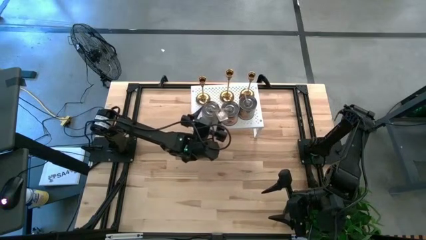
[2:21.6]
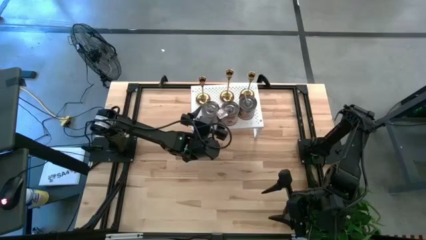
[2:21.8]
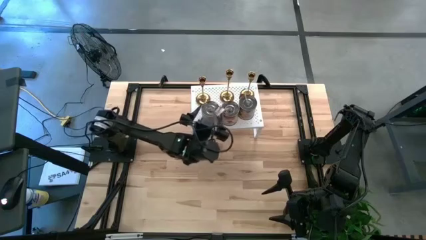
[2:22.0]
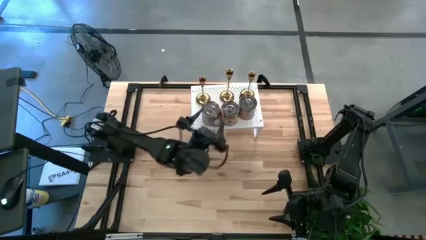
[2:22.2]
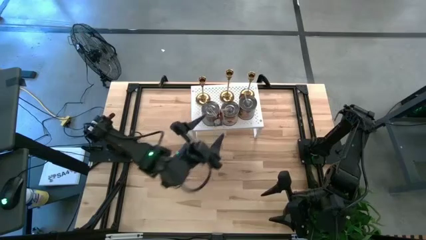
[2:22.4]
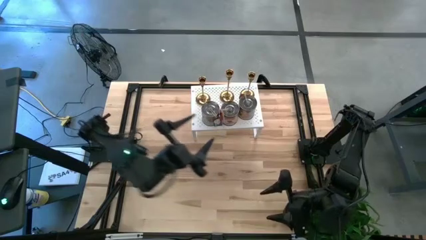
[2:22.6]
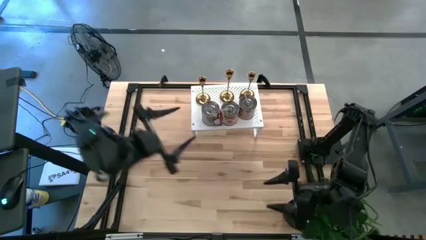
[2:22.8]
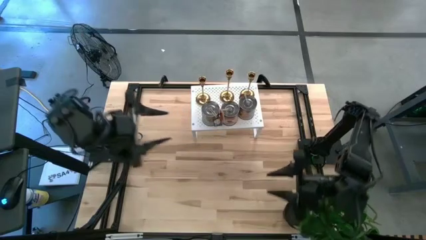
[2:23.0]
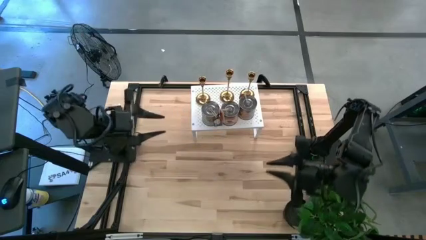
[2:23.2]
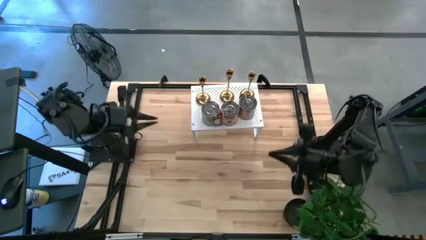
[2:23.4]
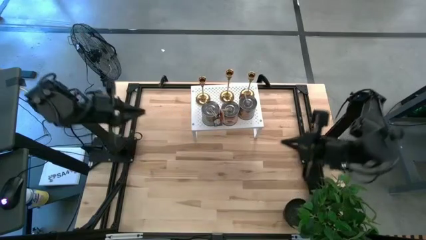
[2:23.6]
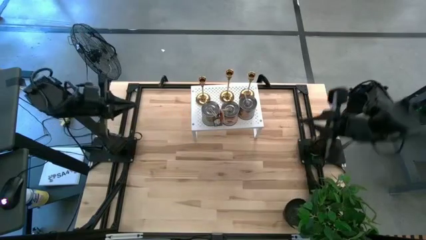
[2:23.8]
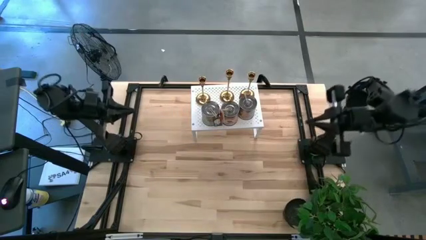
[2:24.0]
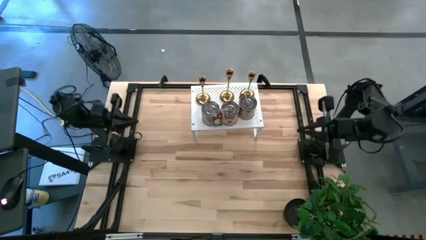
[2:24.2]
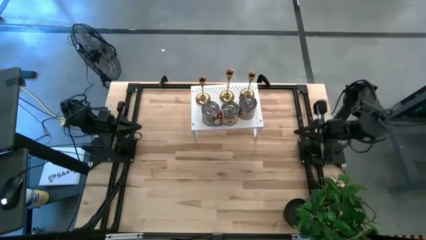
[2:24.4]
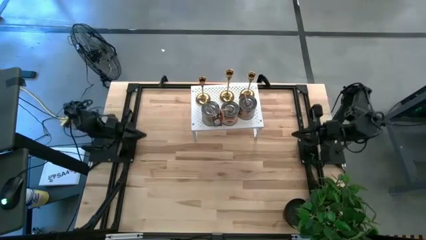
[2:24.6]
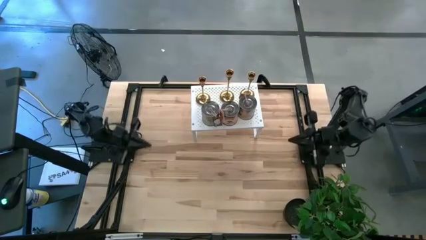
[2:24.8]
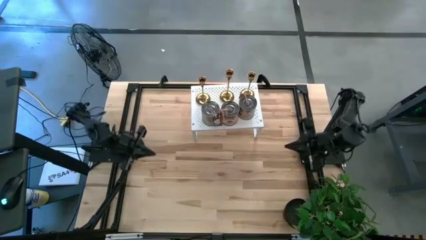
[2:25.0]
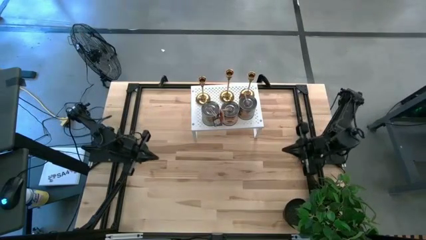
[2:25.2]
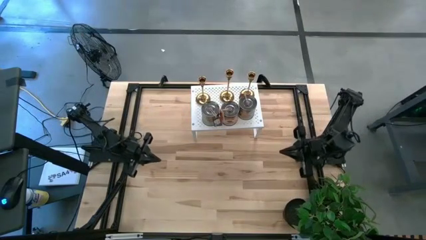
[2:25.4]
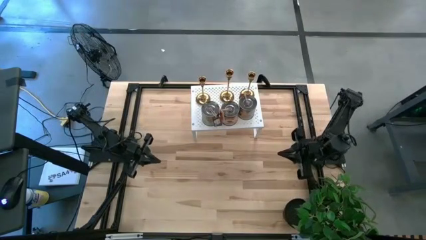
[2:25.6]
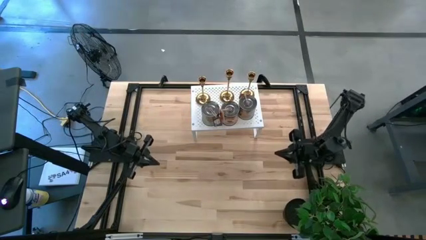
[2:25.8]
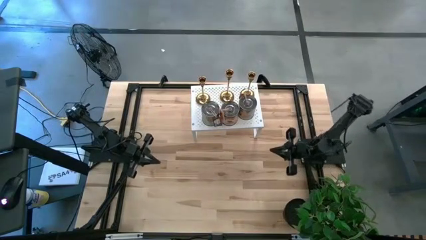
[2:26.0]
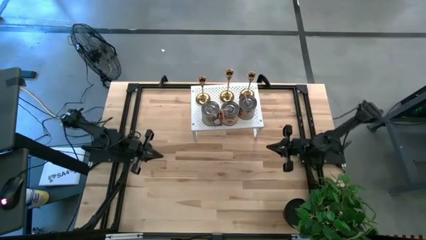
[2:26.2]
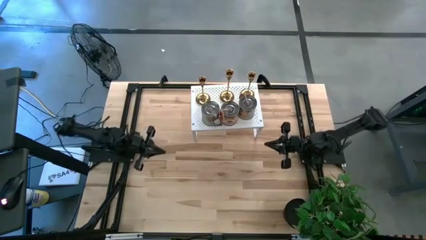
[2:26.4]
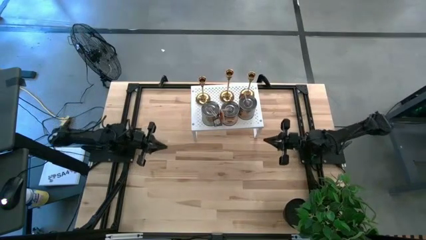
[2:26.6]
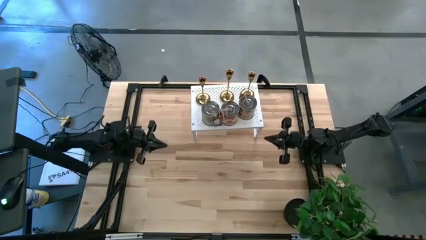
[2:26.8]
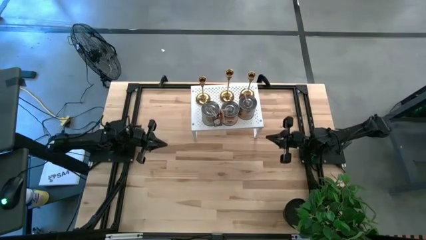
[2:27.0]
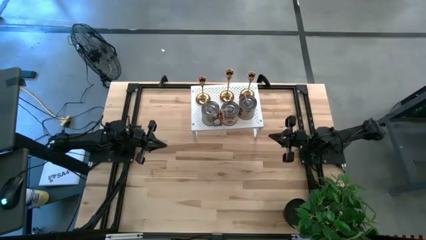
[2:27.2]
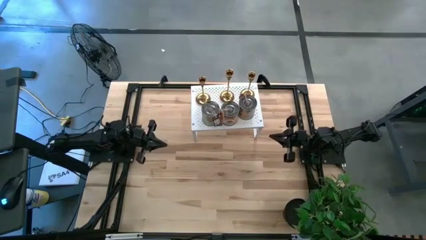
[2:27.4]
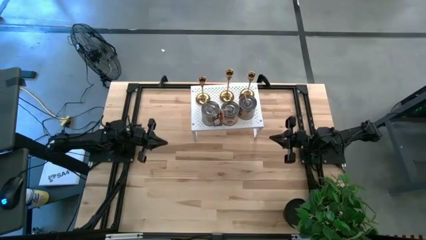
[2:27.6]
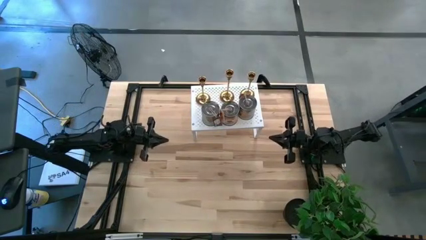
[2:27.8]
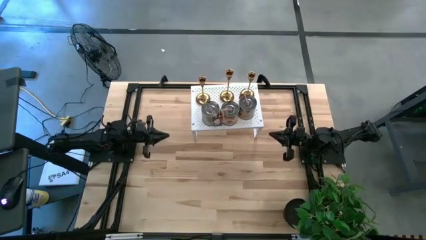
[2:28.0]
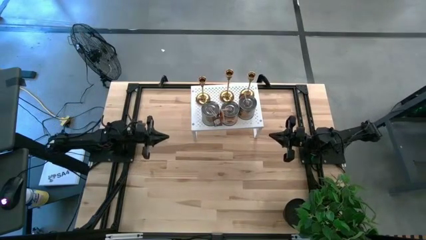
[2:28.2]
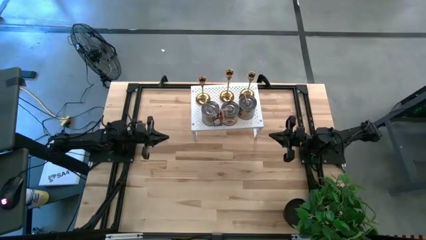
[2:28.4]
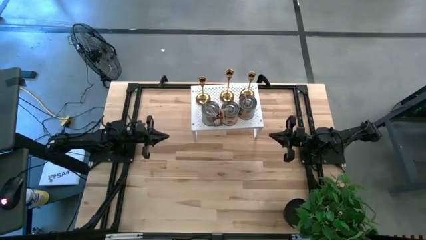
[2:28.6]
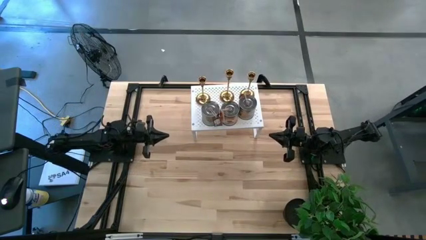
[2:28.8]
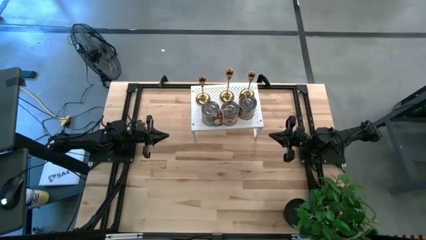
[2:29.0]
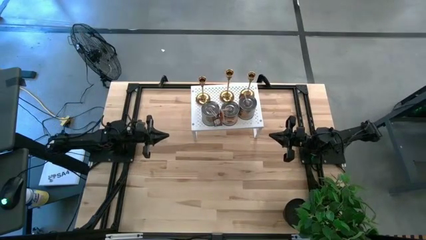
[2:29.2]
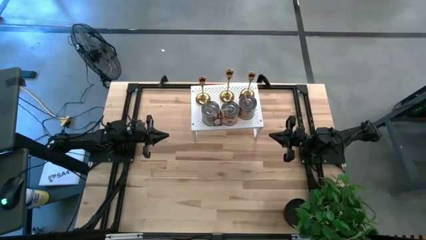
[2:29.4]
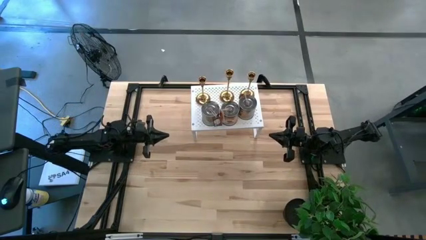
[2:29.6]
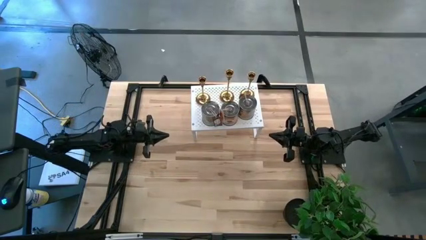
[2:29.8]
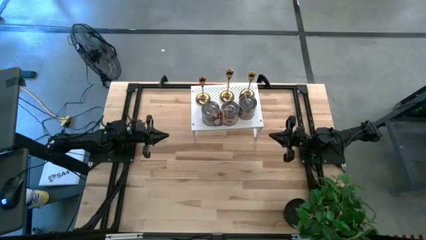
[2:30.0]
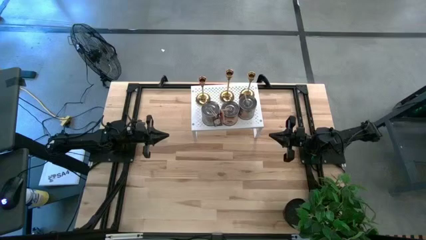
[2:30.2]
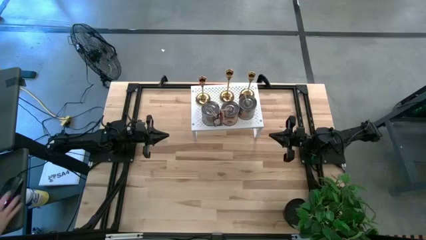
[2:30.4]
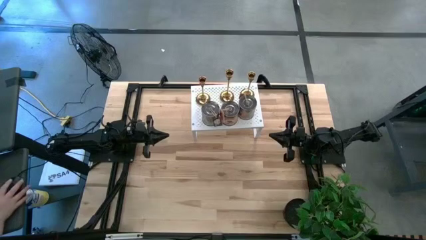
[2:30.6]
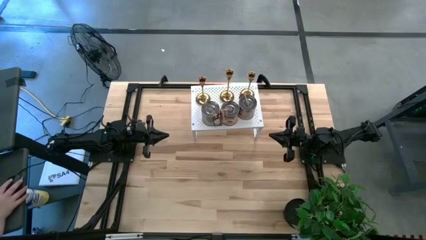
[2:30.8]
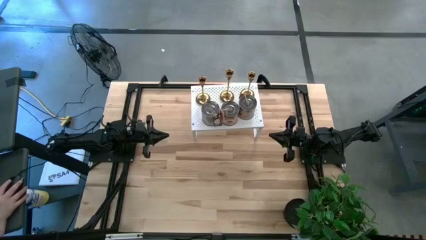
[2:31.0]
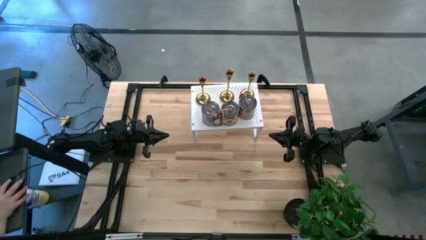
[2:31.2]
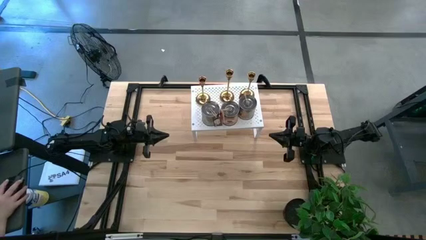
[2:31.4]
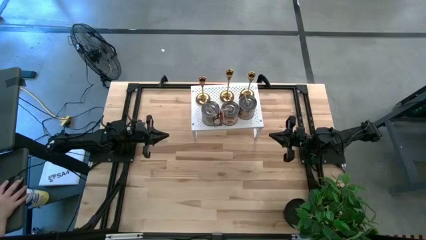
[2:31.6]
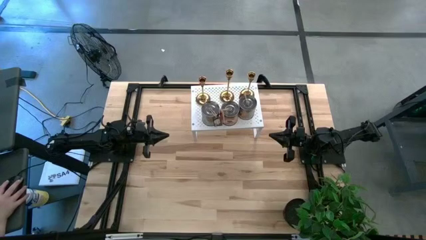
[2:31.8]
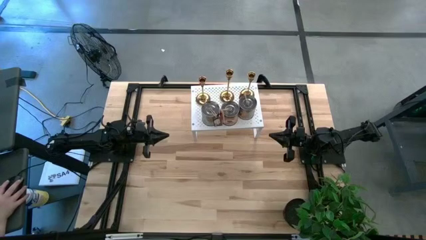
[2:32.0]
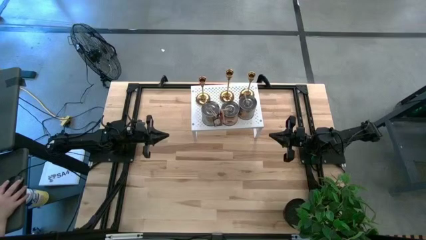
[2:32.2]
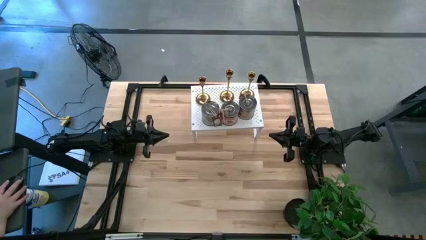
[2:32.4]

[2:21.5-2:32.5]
Task: Pick & Place candle stick holders
Return to Home Position

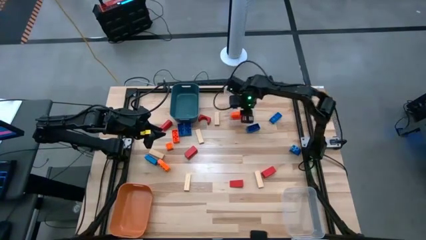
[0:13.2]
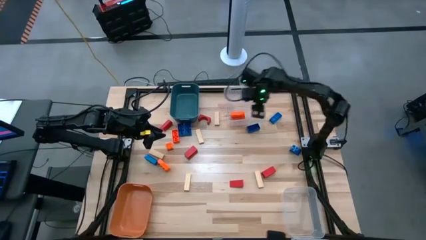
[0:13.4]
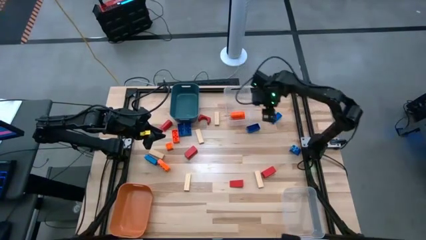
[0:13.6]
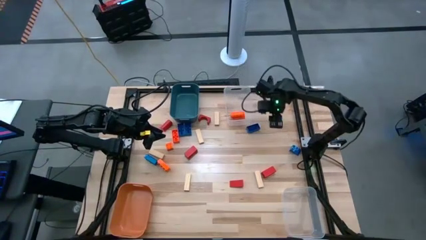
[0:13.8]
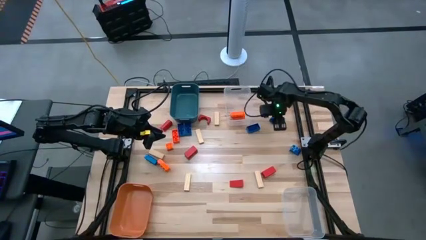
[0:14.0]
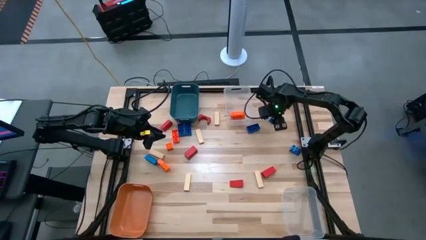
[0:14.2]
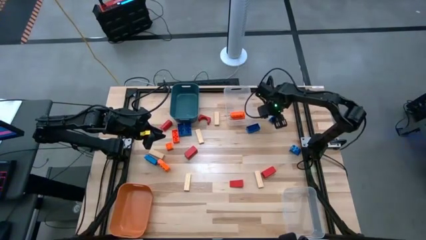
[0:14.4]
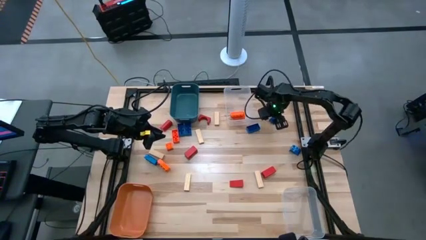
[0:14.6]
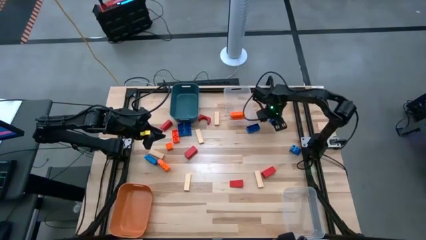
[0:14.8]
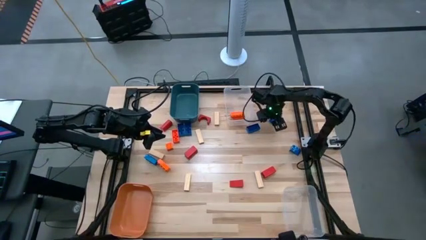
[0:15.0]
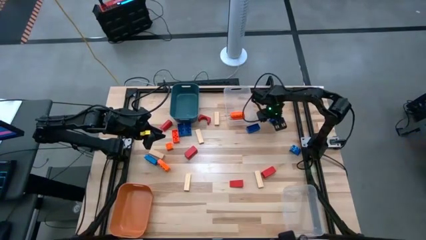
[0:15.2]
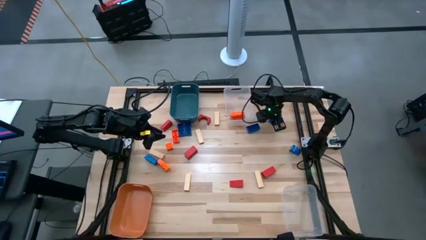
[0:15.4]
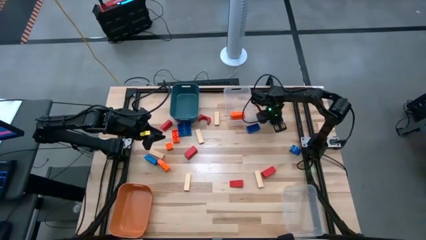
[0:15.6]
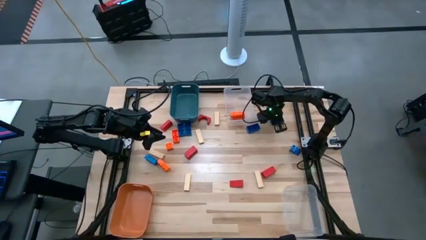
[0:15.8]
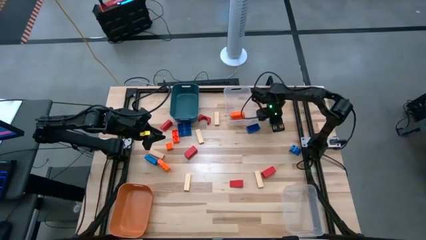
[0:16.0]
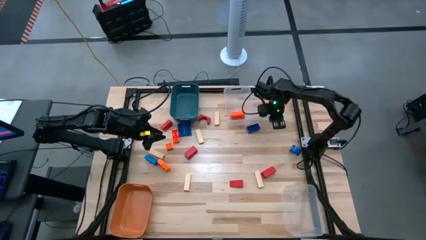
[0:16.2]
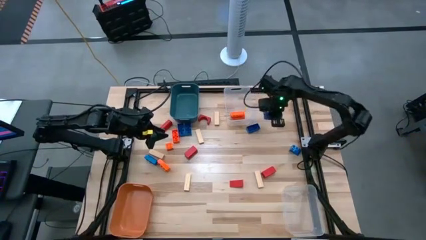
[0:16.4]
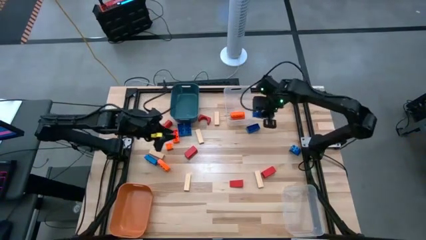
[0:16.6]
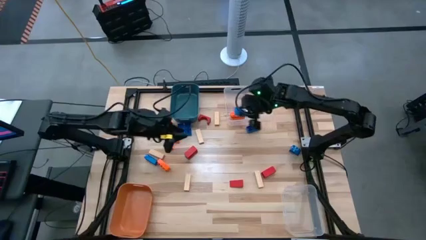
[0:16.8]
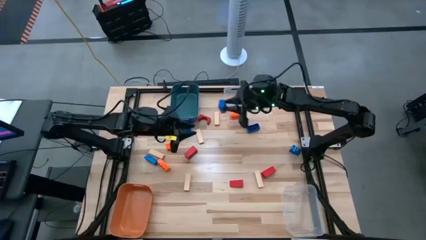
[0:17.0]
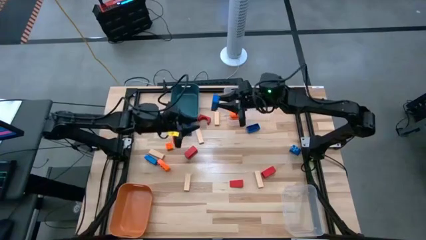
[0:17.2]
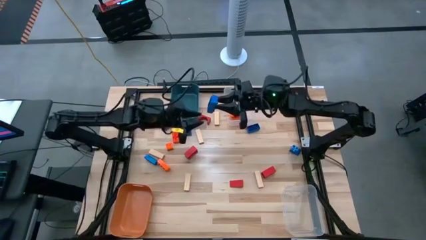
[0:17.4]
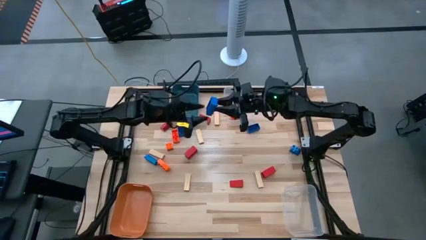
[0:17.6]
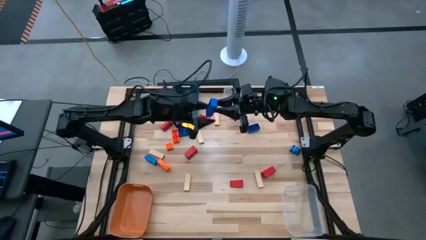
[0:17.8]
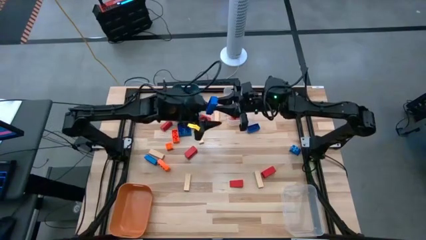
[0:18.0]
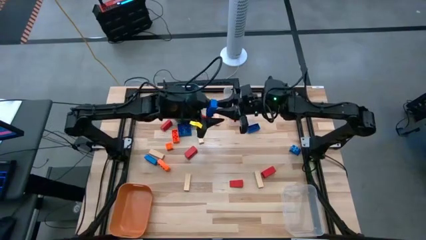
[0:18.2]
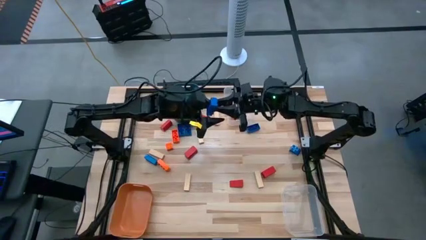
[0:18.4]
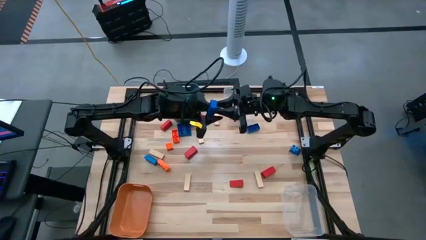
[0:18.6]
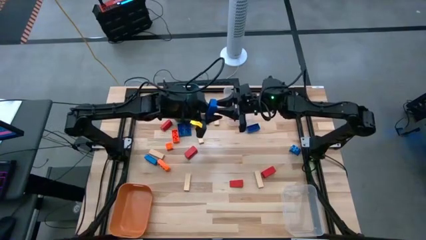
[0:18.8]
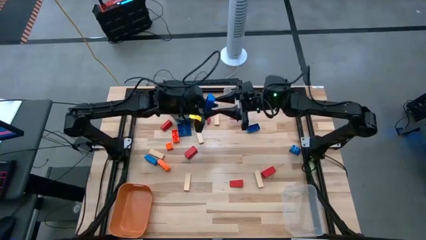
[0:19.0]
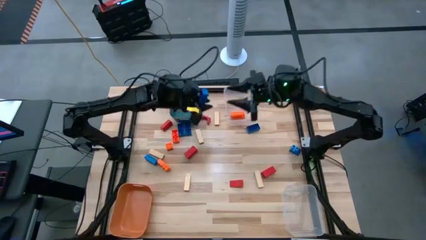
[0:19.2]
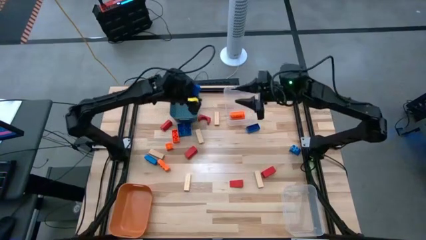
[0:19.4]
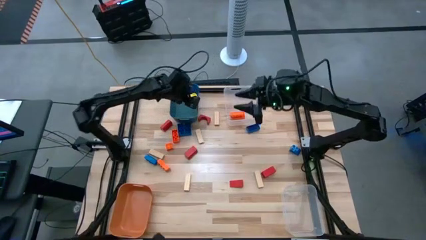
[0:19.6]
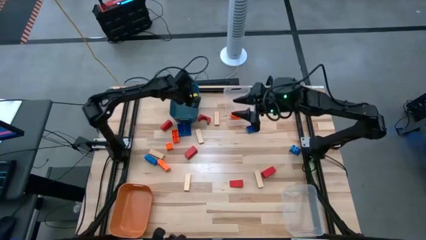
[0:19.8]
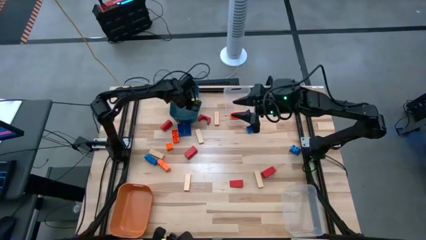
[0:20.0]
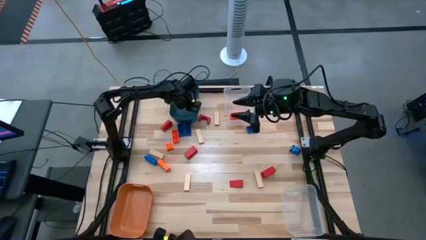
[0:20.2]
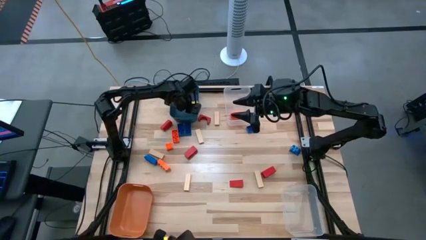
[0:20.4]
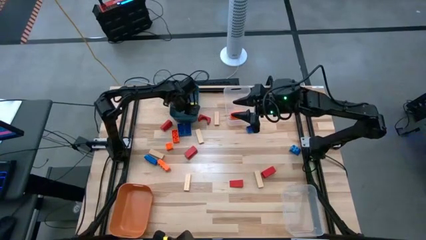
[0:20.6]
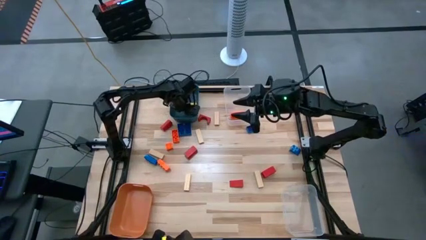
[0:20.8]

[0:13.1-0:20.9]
Task: Sort blocks
Put the blue game piece into the dark blue bin
